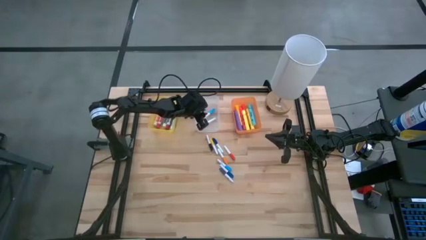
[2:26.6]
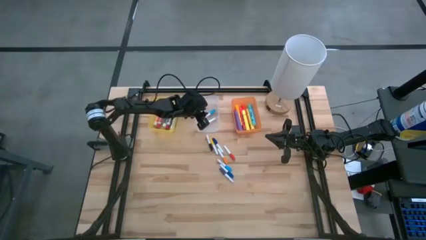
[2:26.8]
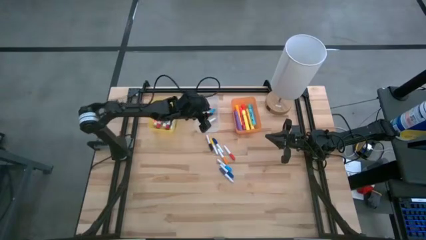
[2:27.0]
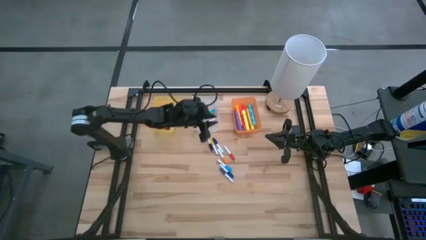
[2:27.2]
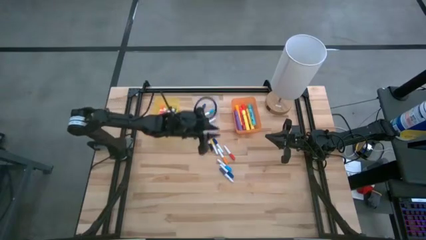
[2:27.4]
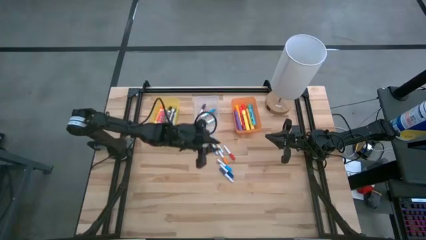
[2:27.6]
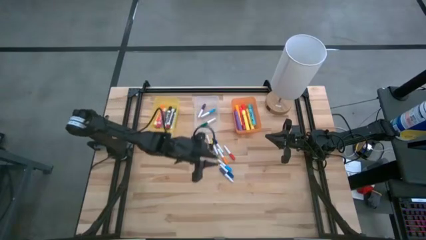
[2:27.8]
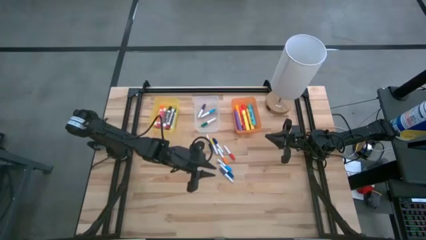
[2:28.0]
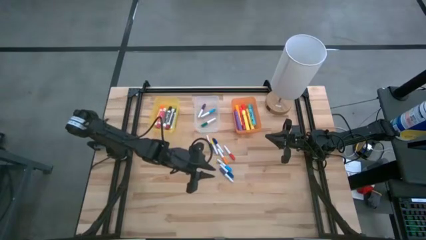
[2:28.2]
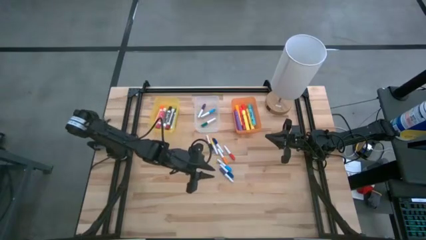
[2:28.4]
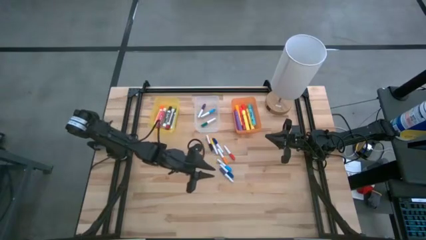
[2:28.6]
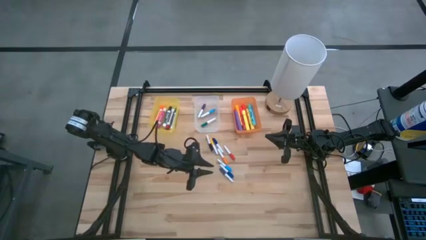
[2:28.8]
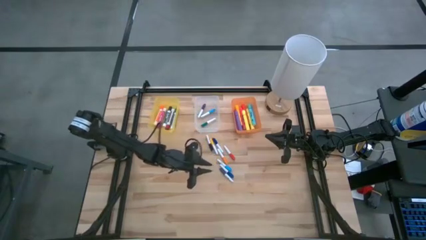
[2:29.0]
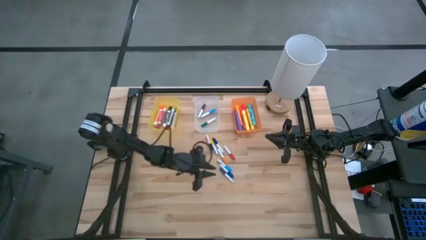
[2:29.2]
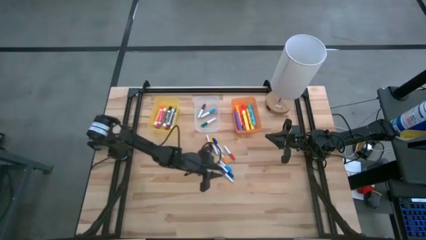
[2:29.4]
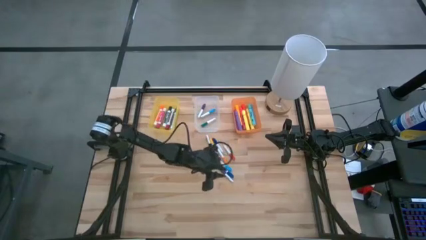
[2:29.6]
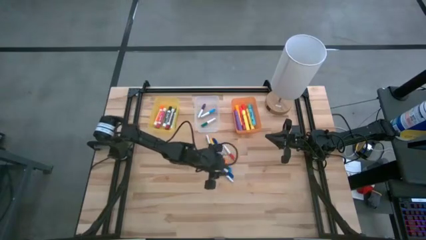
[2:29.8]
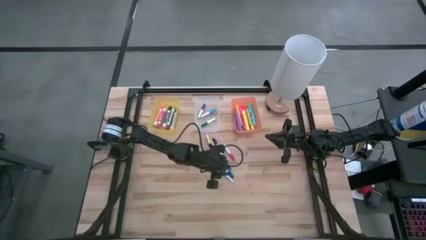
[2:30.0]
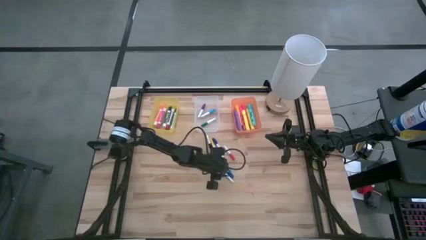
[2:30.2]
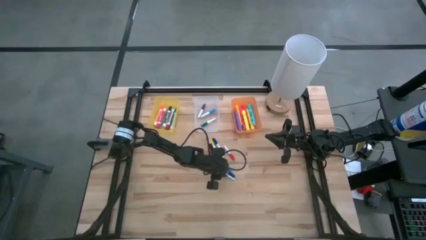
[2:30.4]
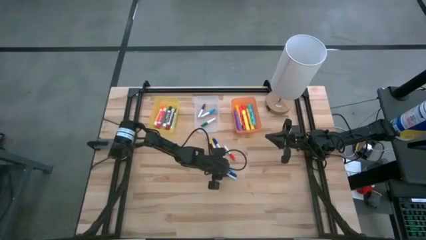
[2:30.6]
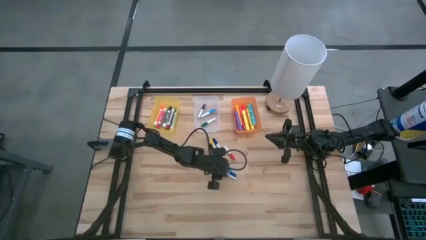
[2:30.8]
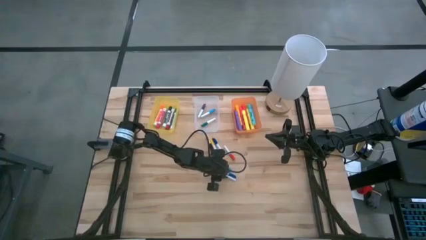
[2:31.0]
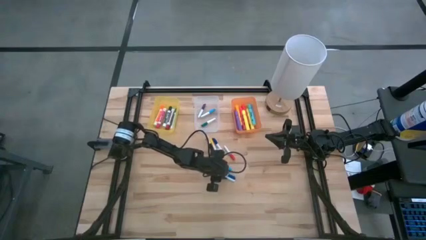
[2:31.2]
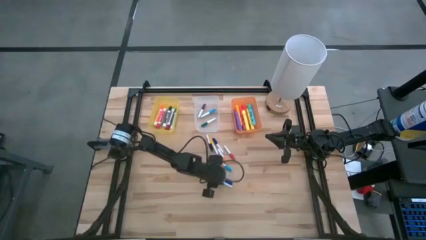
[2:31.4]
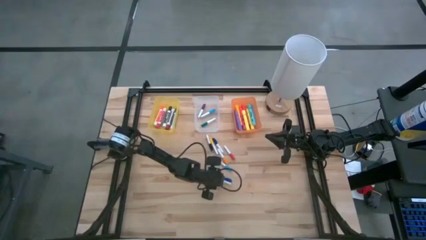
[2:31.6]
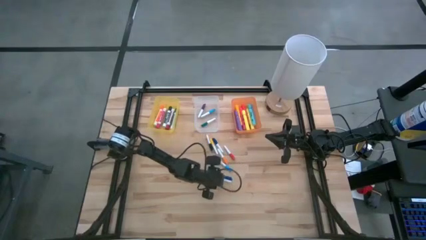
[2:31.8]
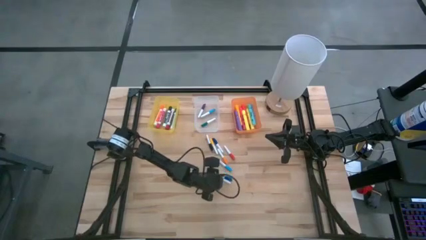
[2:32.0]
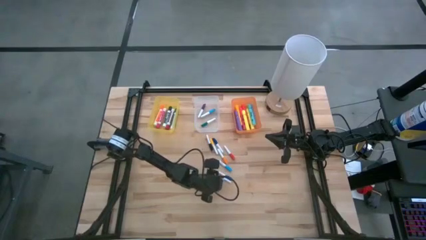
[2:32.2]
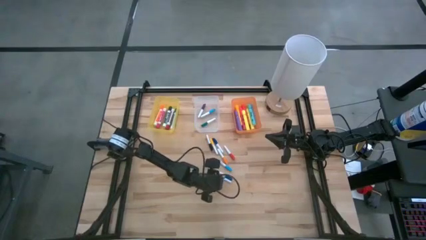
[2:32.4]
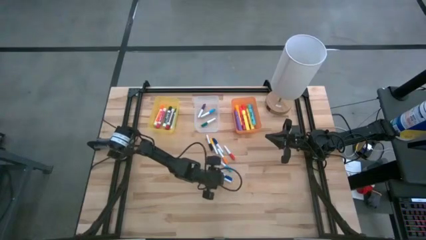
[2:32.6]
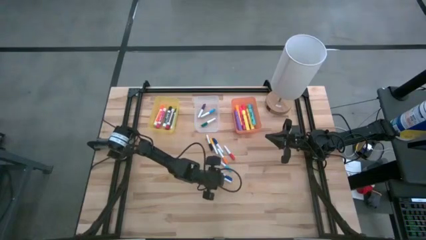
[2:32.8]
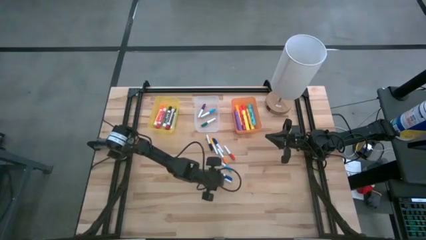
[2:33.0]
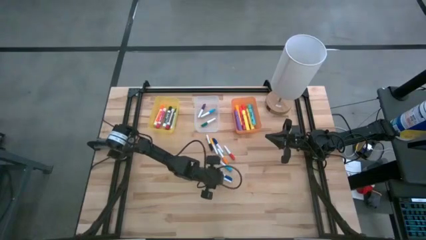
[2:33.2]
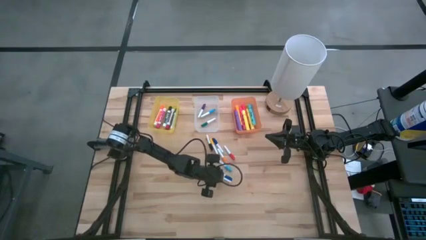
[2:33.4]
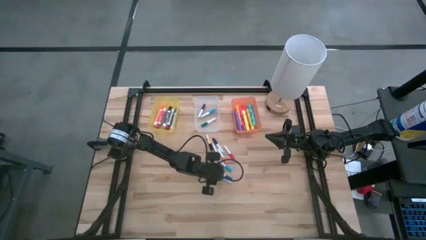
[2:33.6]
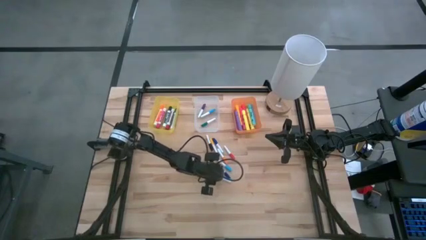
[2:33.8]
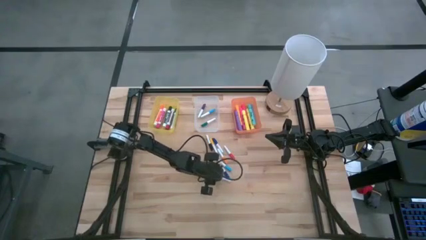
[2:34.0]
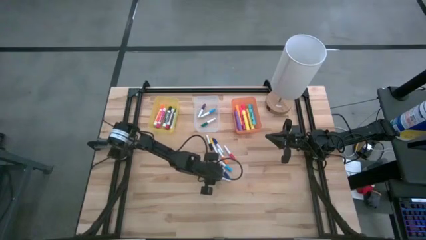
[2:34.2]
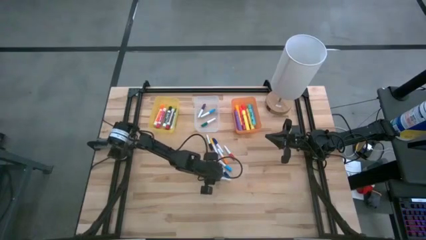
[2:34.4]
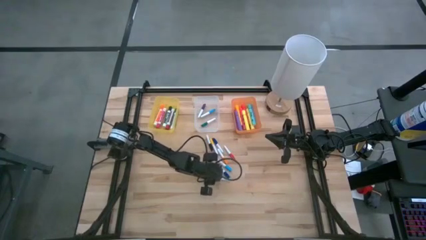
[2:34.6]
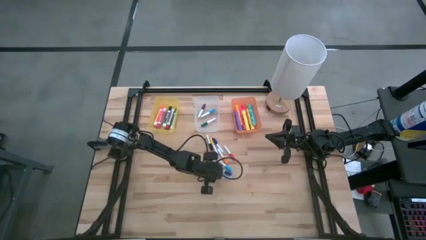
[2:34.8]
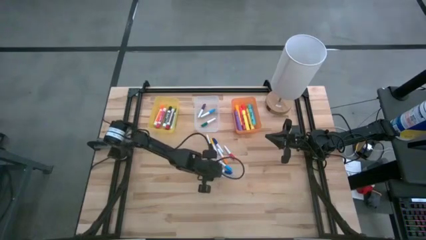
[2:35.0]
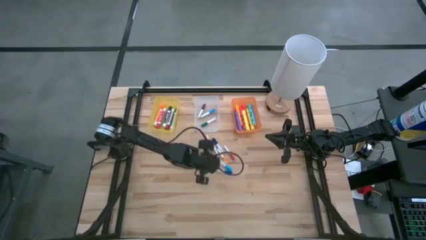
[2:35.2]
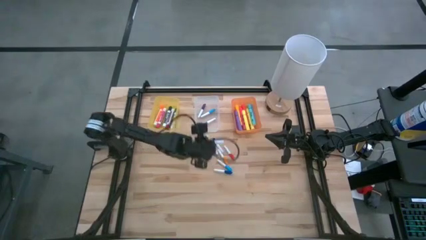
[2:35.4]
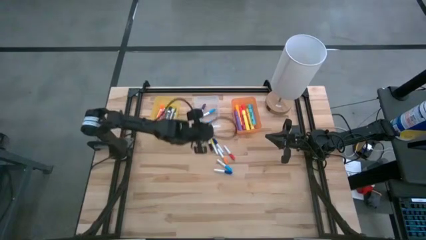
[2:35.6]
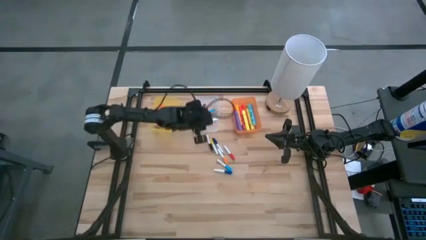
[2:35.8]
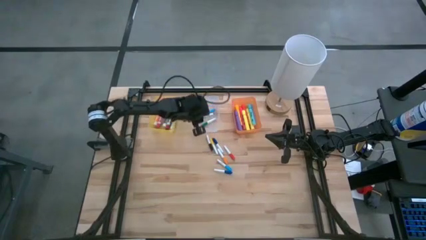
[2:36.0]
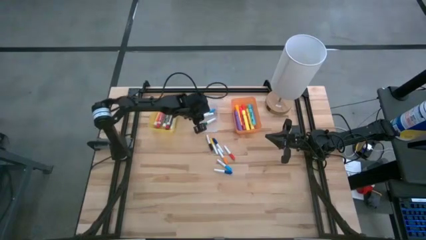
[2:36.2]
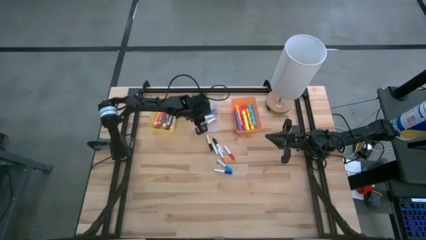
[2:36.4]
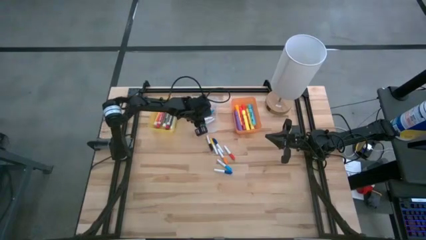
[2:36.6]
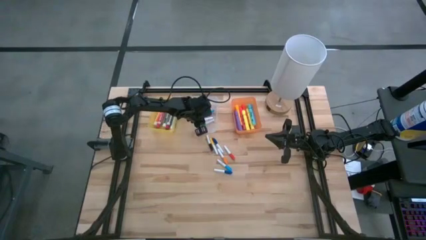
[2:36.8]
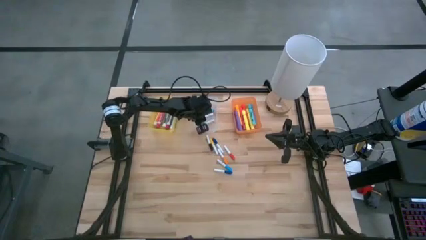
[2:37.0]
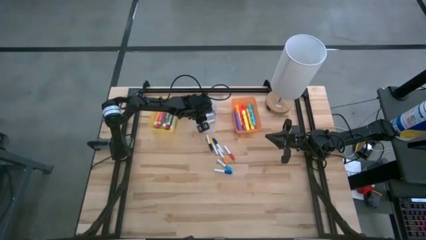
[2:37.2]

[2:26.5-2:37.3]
Task: Pick & Place Markers
Put the small purple highlighter pen into the transparent bin

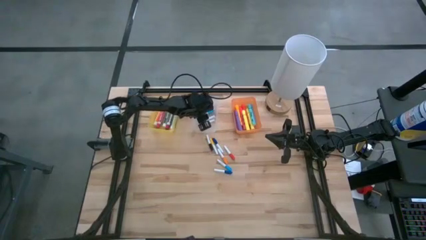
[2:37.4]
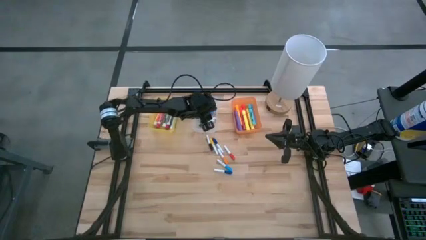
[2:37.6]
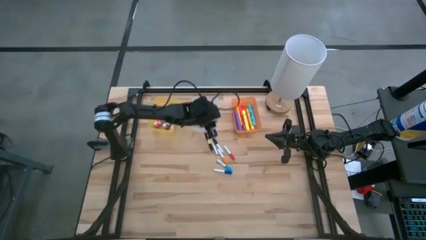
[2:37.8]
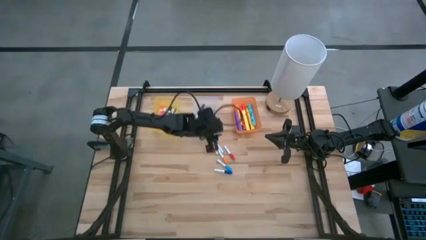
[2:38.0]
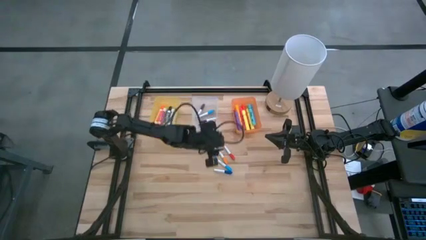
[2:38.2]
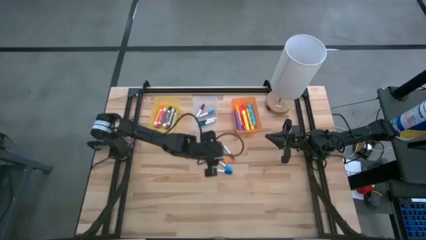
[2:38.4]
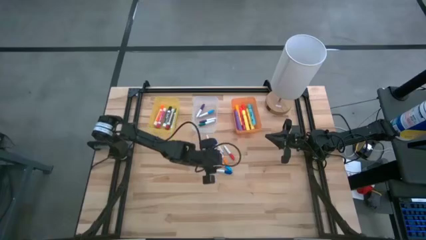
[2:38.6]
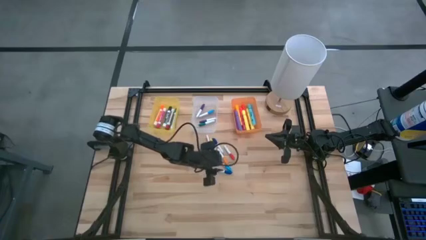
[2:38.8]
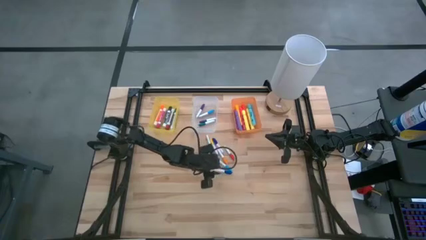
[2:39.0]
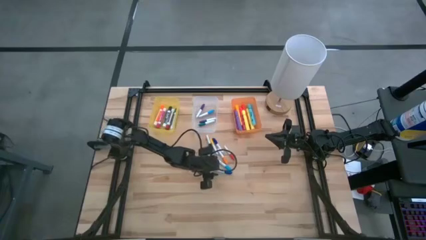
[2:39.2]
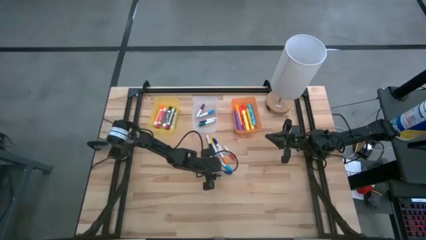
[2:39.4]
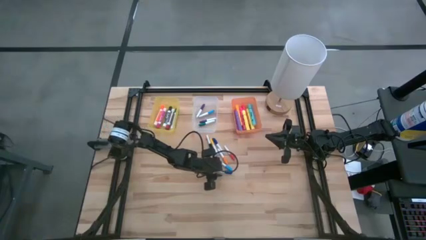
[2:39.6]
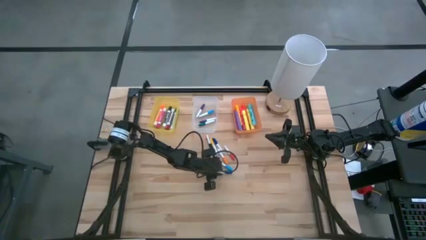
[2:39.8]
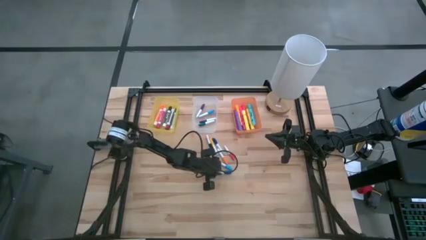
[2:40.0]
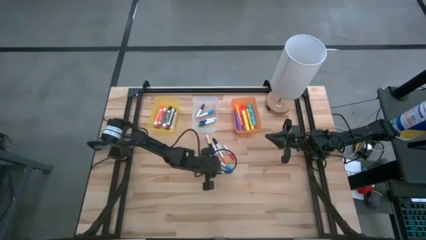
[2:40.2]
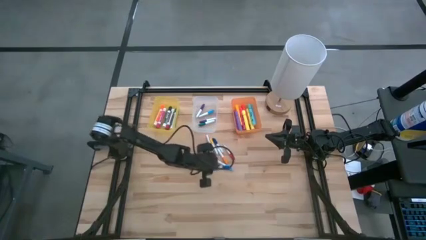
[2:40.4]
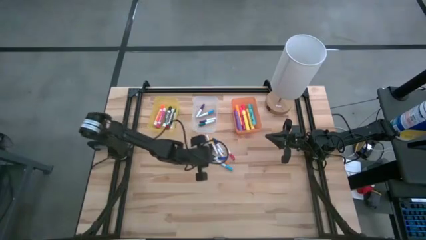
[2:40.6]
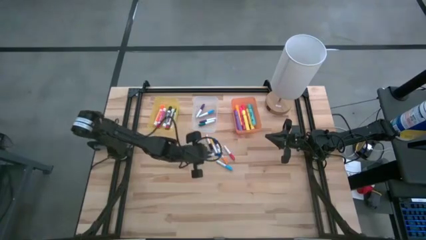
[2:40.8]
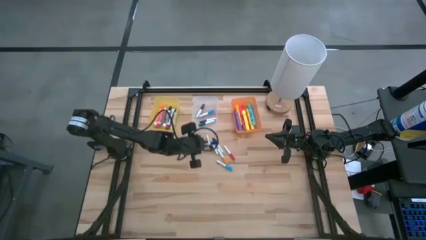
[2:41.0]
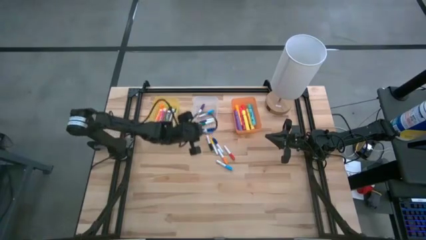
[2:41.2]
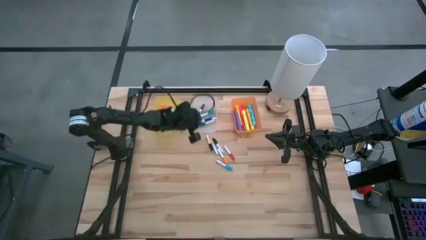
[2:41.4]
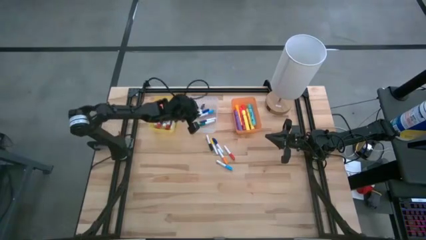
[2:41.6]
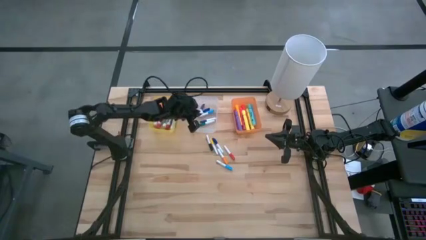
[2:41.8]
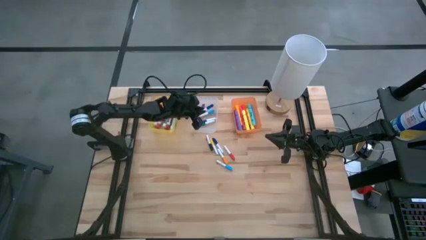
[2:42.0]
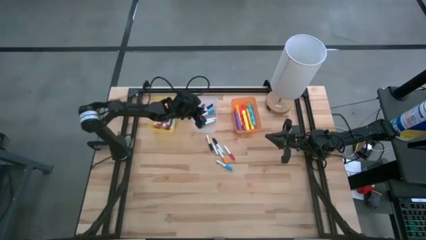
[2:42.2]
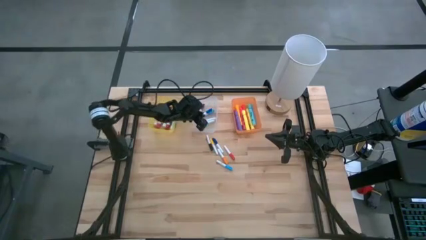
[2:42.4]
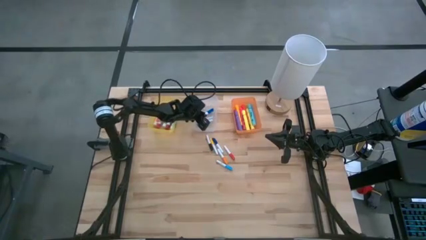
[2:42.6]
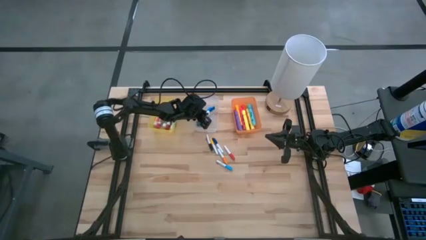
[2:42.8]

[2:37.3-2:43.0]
Put the bottom small blue highlighter pen into the transparent bin
